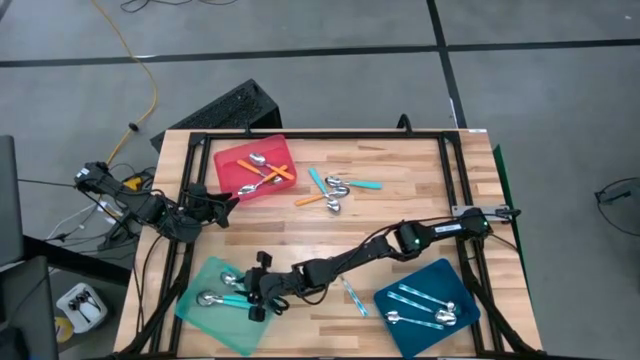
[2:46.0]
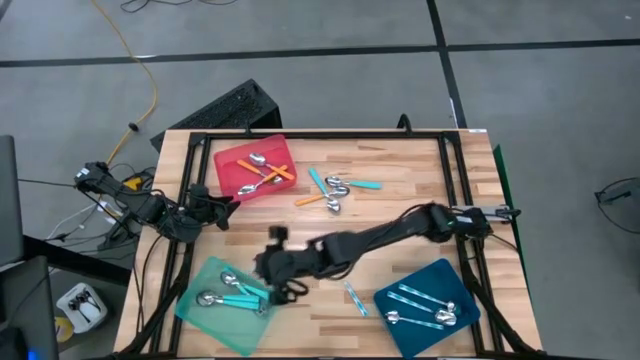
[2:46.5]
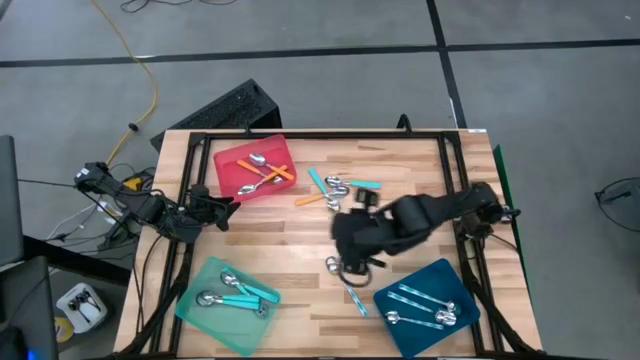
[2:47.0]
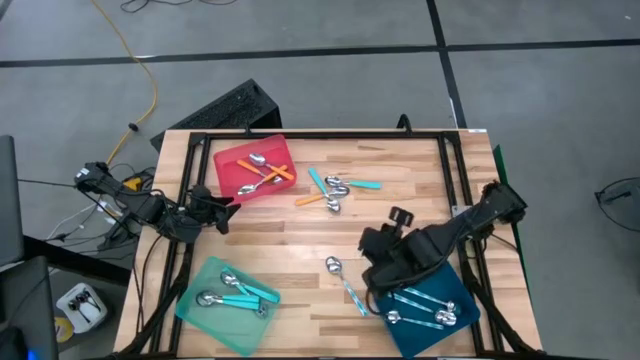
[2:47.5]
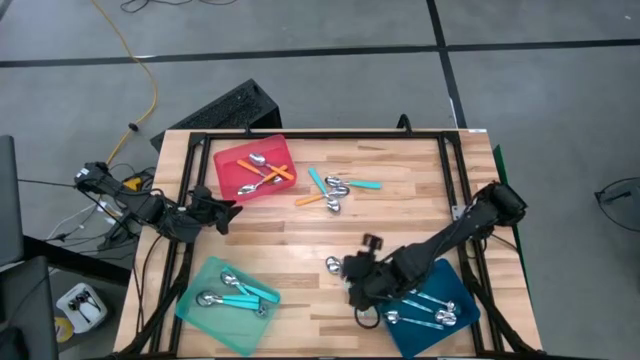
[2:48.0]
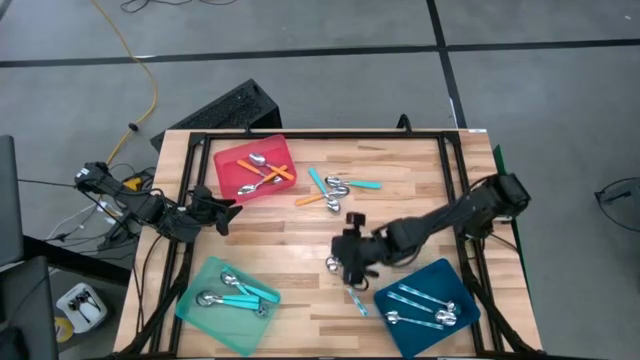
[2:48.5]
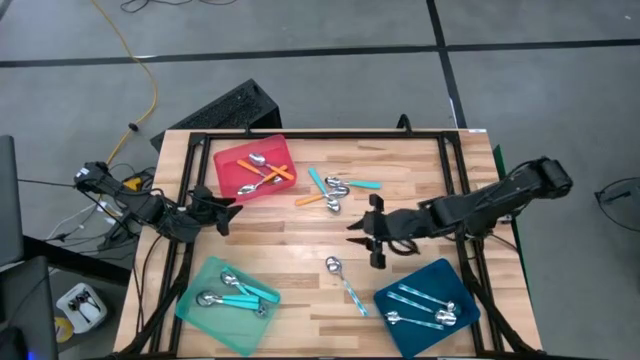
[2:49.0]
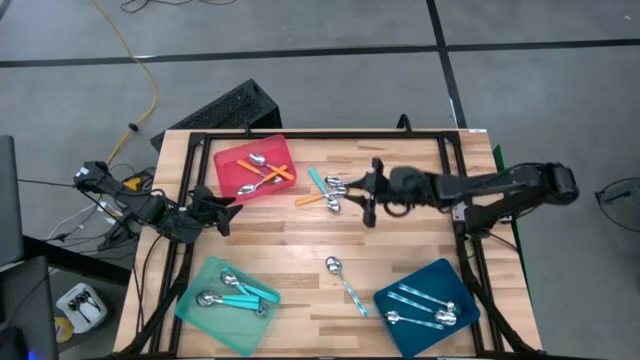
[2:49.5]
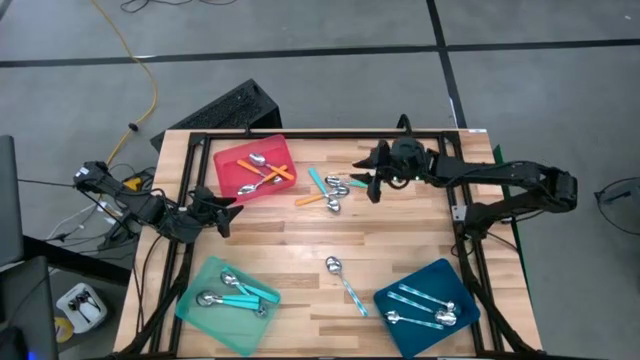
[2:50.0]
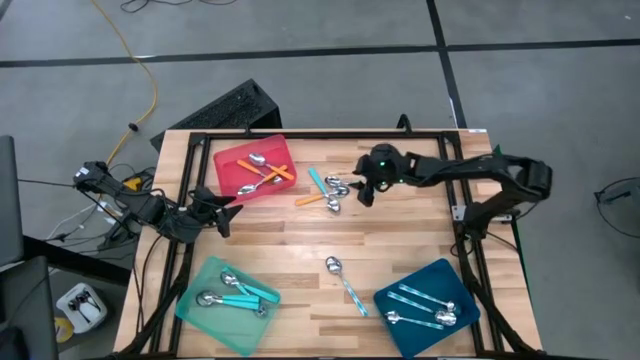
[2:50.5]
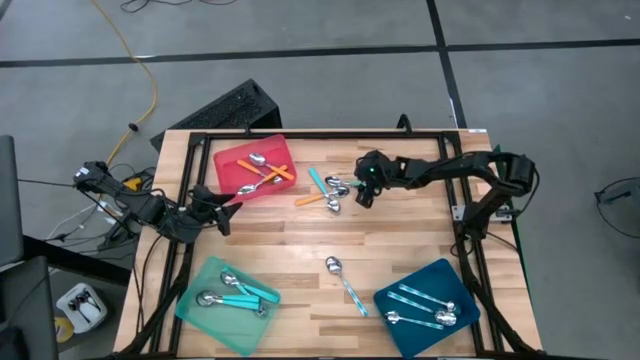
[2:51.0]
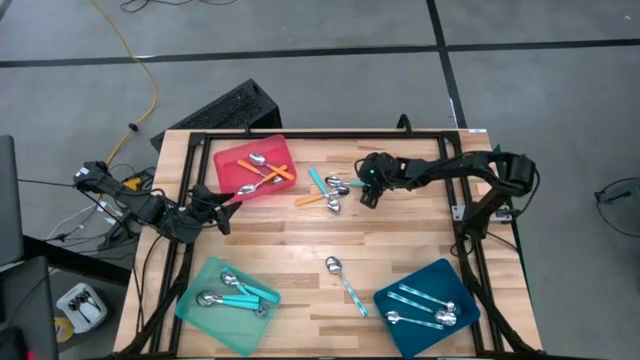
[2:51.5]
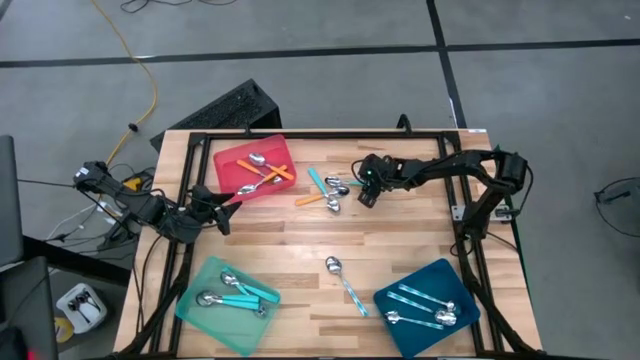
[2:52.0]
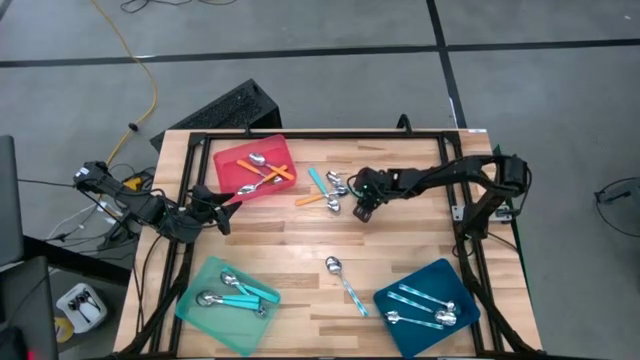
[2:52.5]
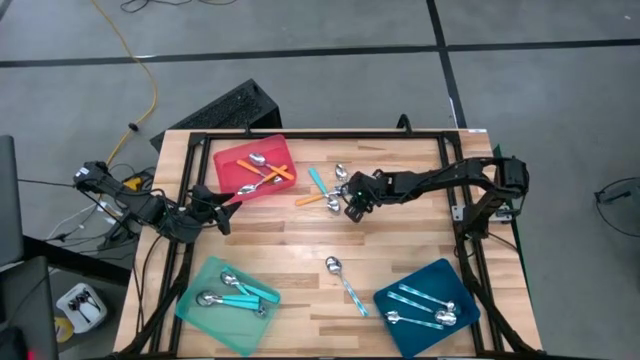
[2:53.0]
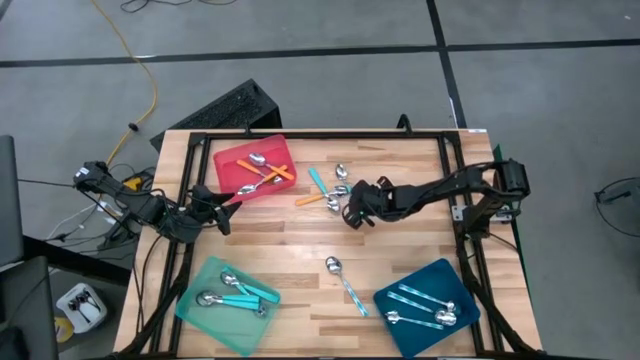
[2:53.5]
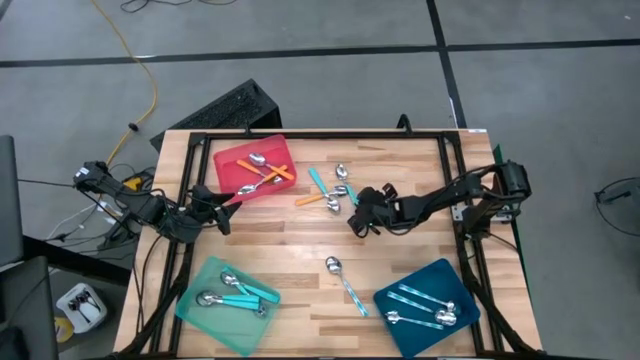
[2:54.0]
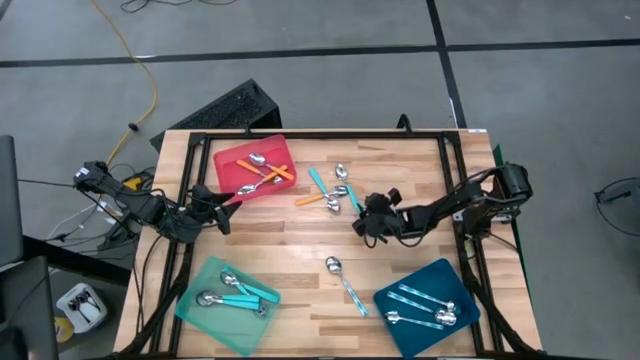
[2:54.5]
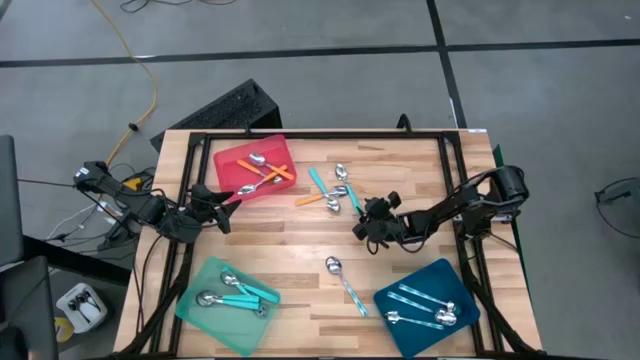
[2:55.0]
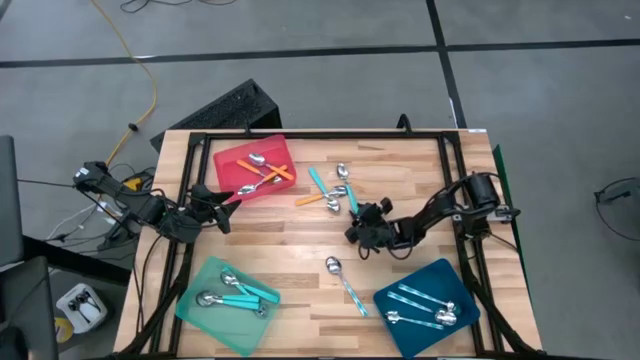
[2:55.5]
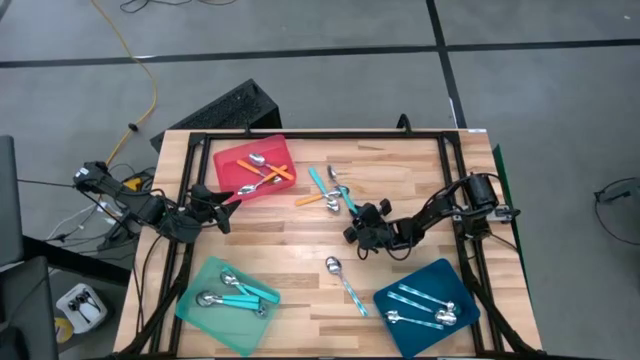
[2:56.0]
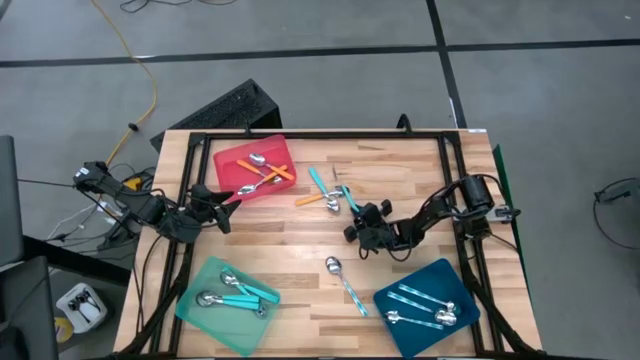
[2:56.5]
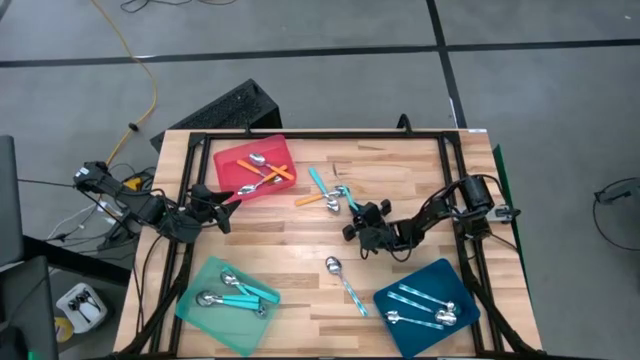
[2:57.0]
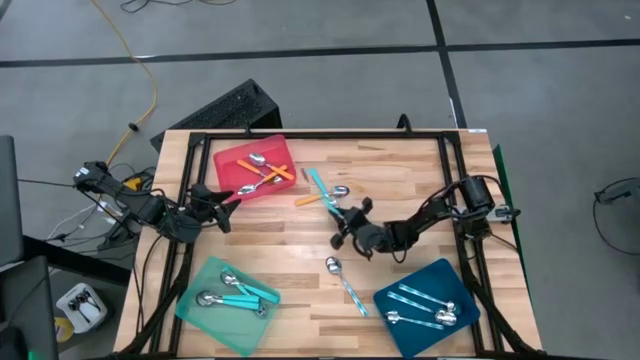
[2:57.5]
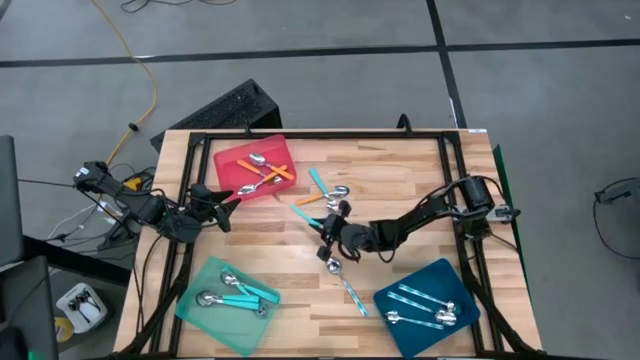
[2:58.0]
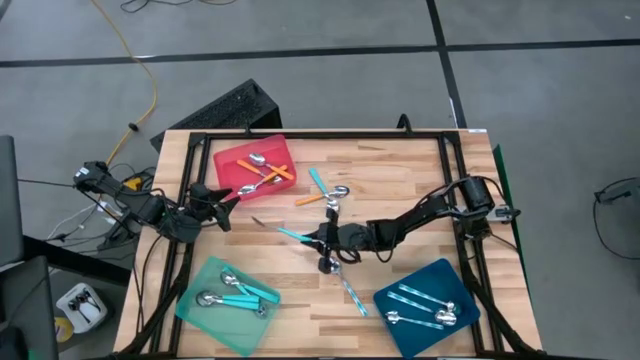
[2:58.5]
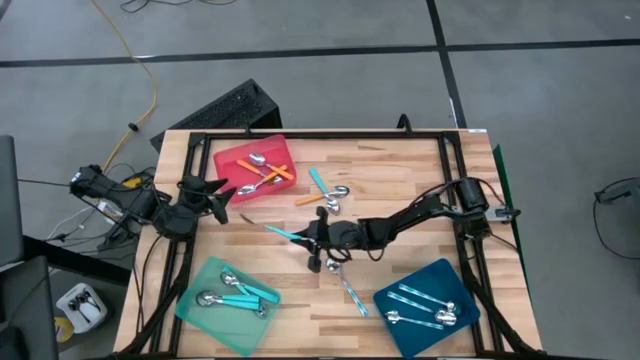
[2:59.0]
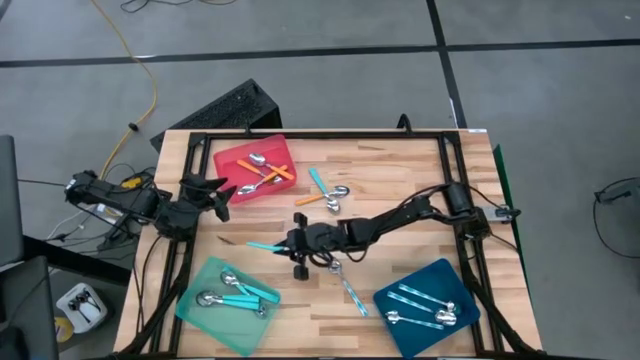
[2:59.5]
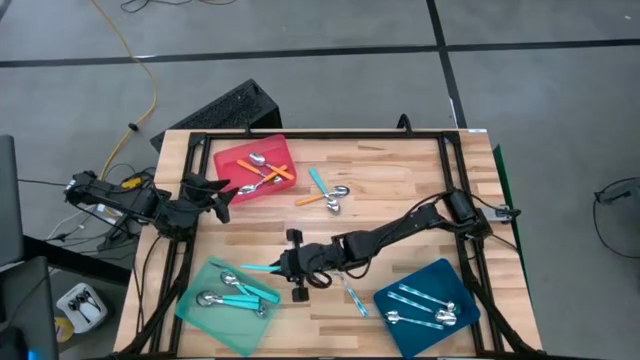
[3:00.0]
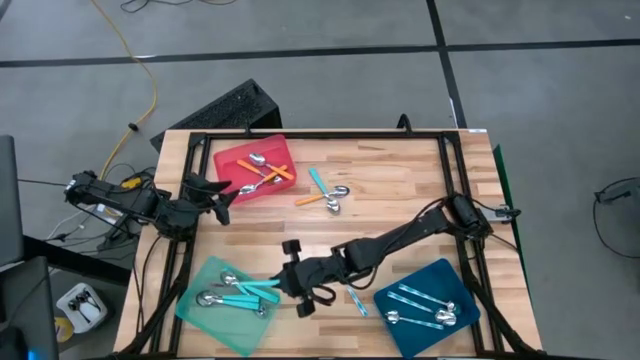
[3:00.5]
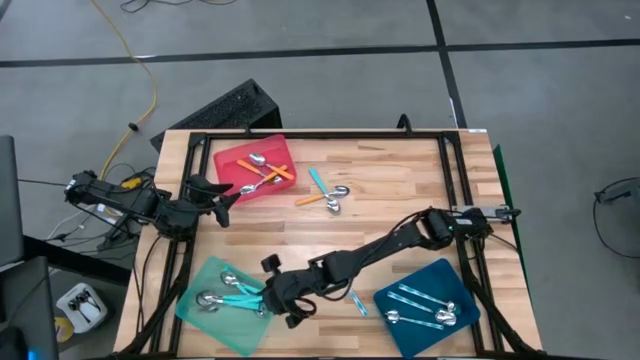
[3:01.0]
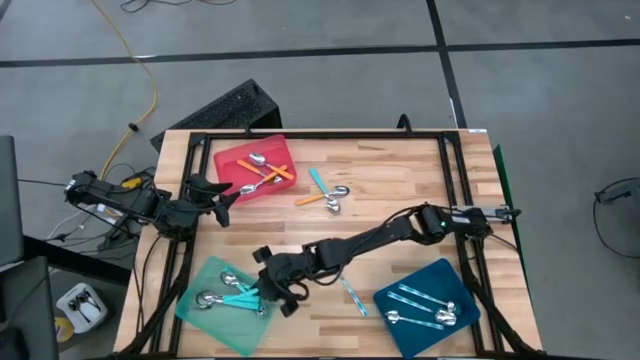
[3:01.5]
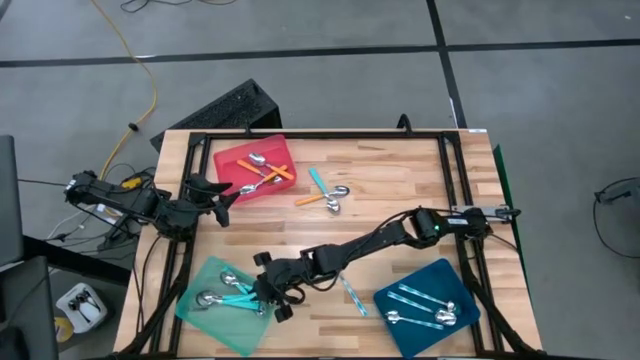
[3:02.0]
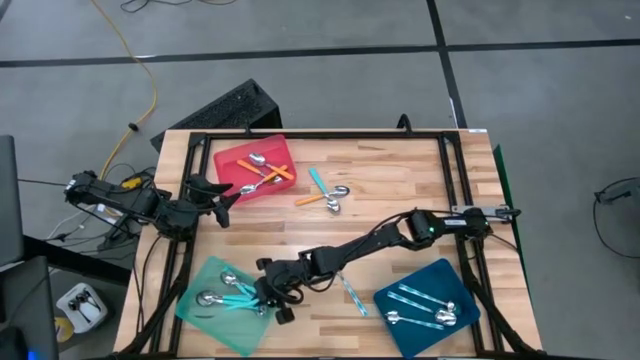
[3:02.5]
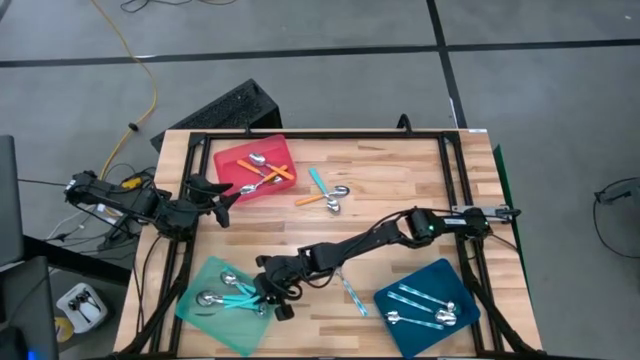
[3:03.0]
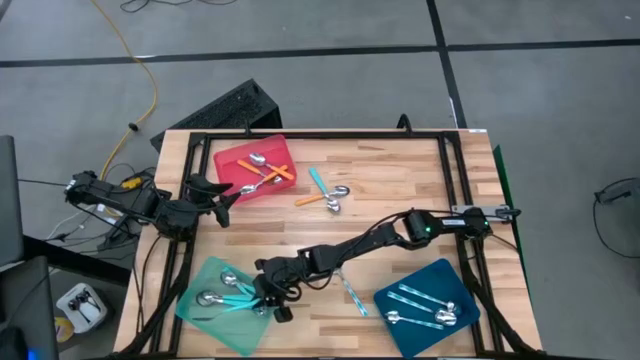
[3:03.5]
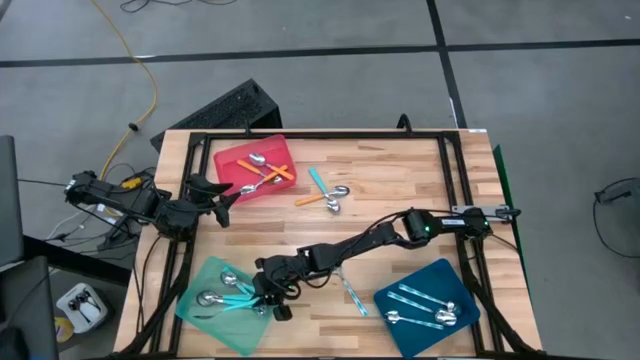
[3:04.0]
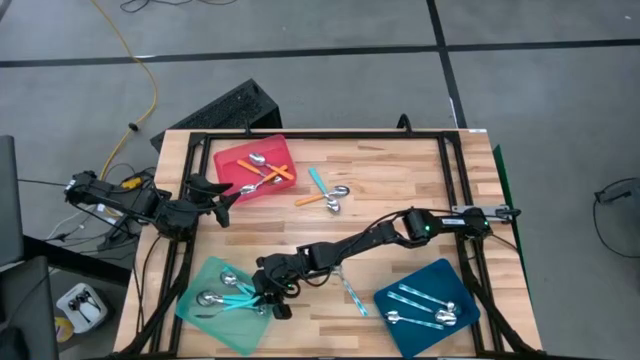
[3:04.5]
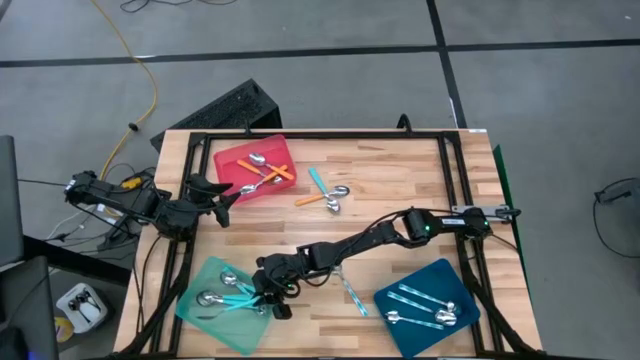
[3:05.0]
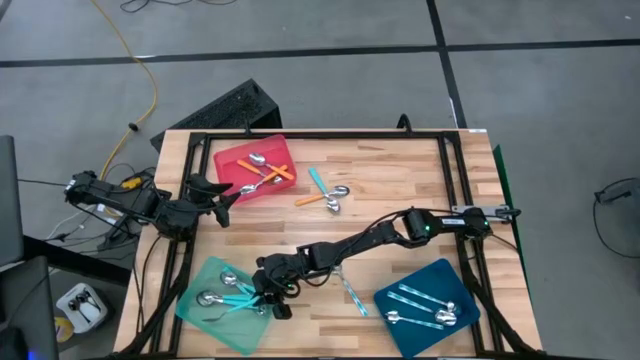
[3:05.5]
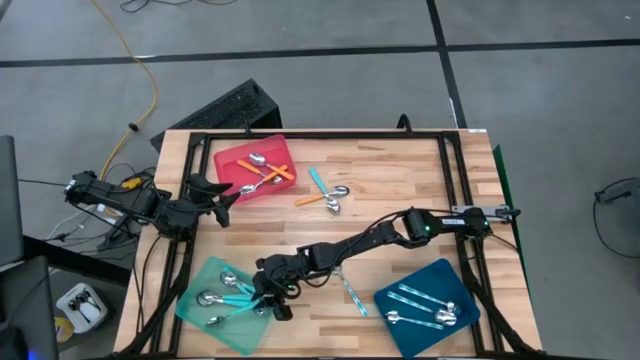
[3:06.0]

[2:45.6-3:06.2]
Task: Sort silverware by color (type)
Put the blue spoon into the light blue bin

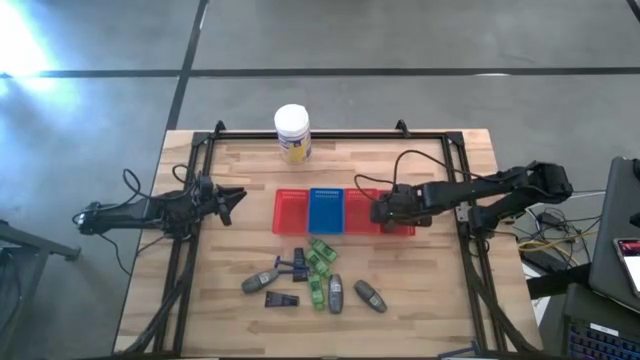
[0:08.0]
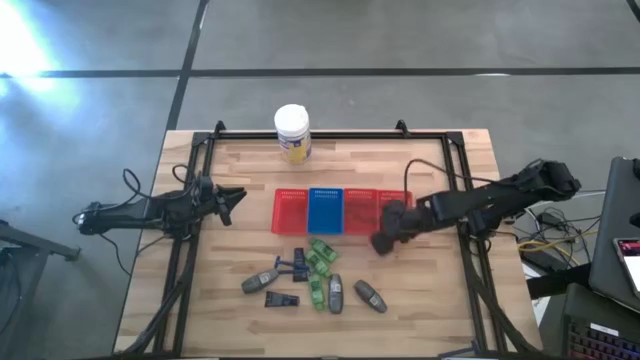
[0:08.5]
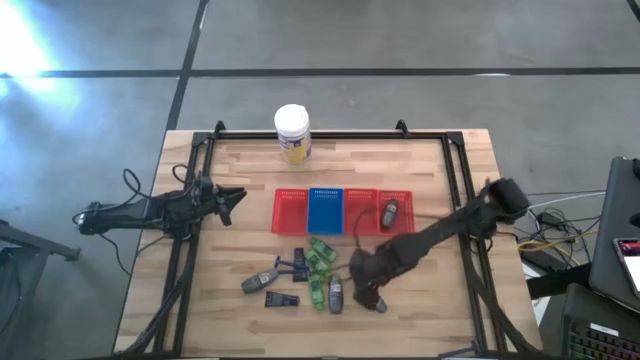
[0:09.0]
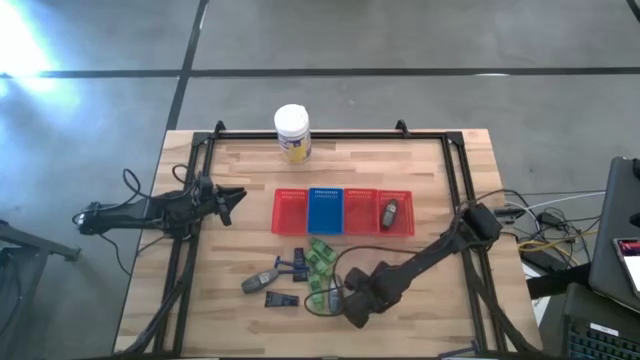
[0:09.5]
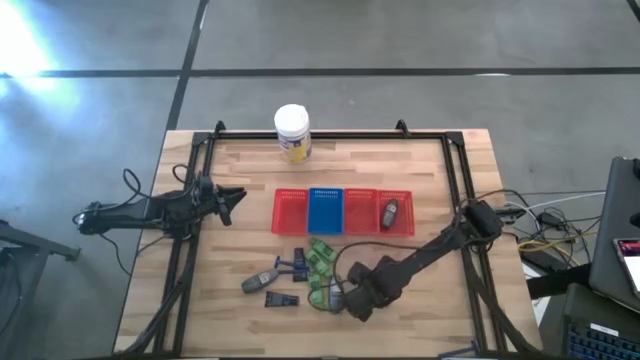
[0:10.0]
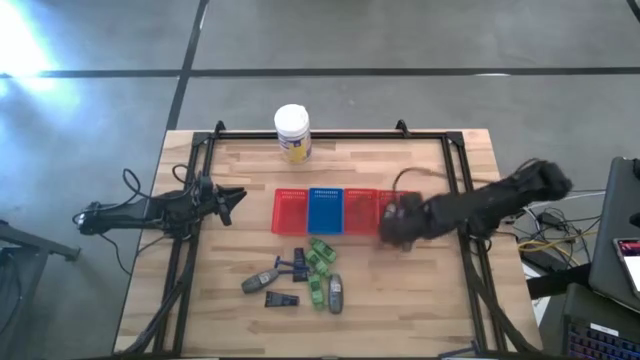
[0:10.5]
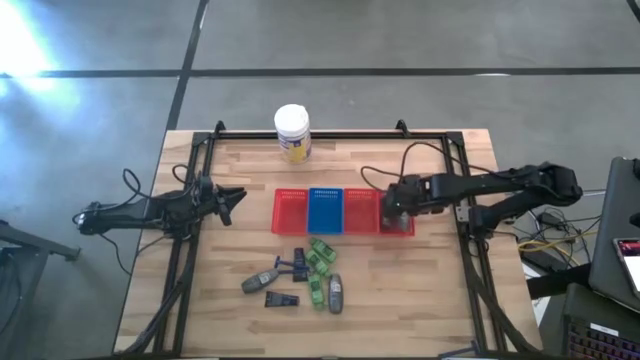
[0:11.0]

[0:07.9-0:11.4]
Task: Pick & Place Travel size toiletries
Put the deodorant into the right red bin
